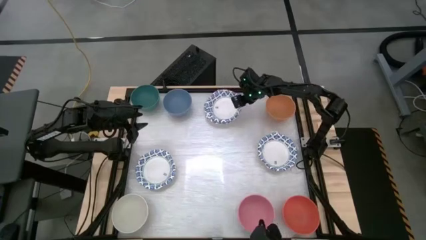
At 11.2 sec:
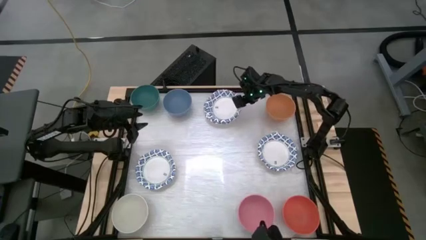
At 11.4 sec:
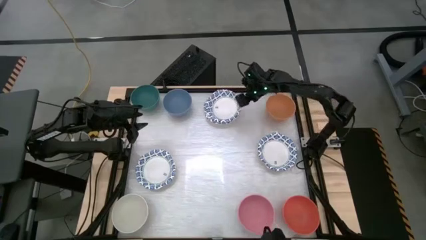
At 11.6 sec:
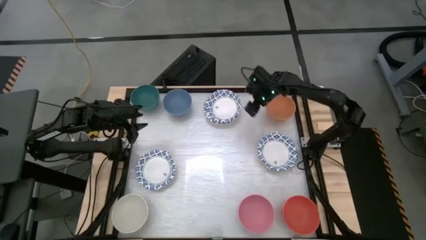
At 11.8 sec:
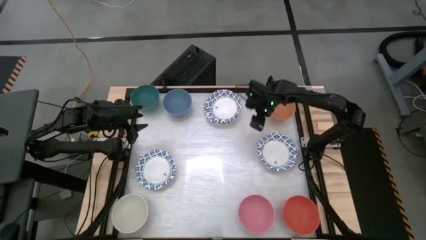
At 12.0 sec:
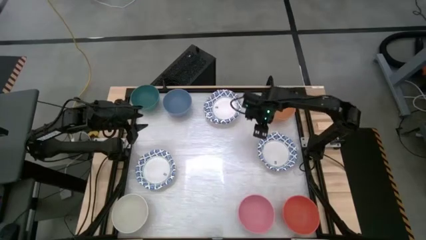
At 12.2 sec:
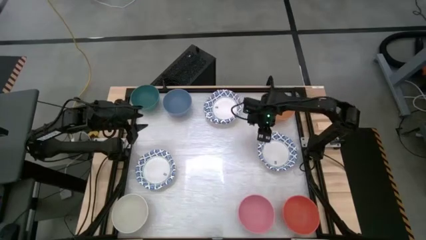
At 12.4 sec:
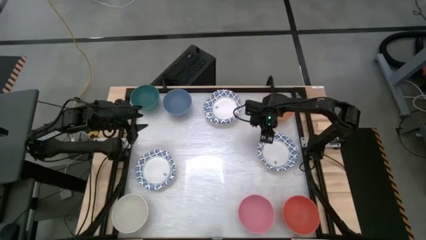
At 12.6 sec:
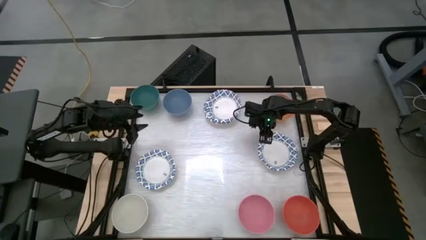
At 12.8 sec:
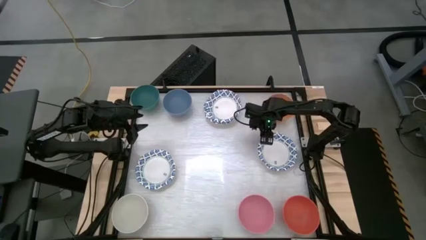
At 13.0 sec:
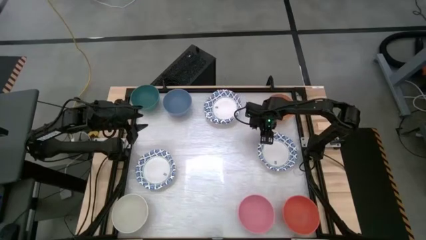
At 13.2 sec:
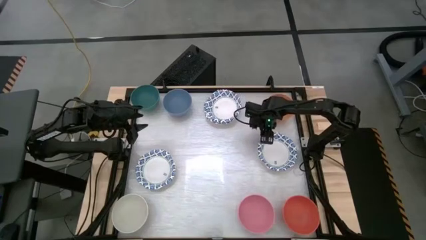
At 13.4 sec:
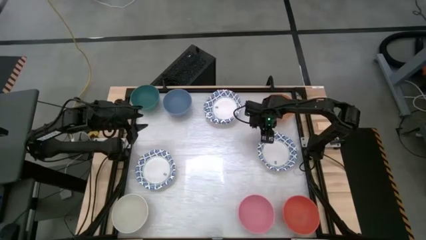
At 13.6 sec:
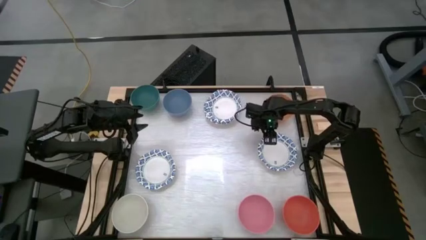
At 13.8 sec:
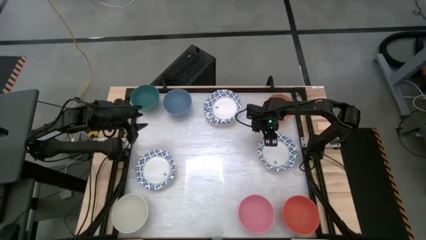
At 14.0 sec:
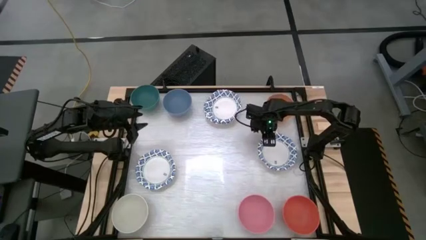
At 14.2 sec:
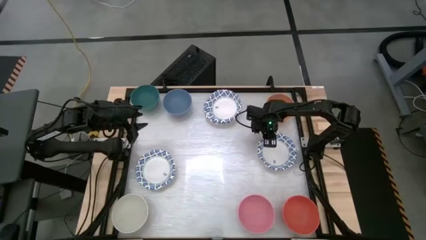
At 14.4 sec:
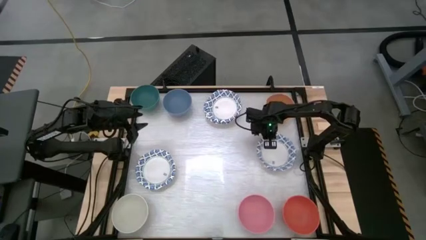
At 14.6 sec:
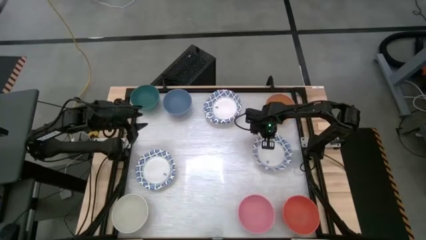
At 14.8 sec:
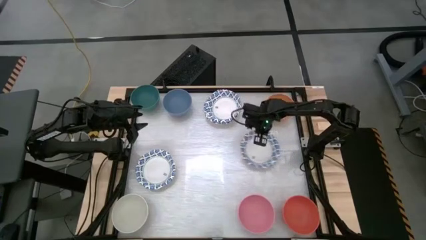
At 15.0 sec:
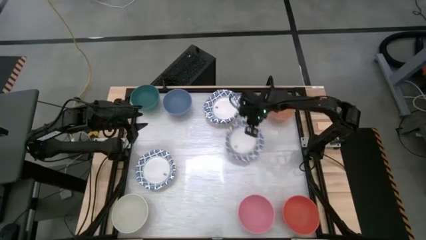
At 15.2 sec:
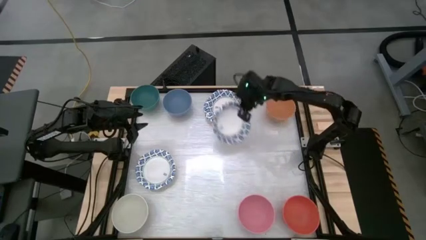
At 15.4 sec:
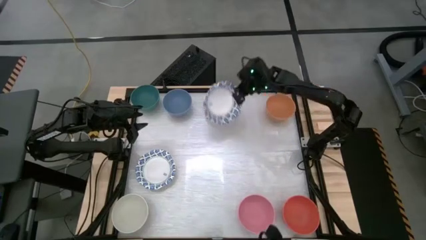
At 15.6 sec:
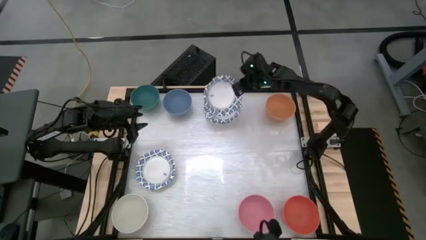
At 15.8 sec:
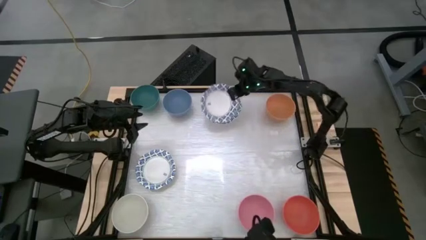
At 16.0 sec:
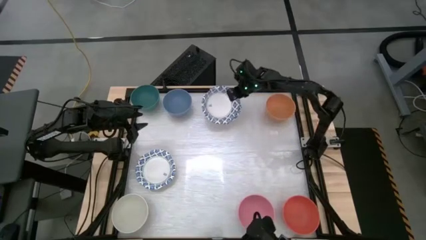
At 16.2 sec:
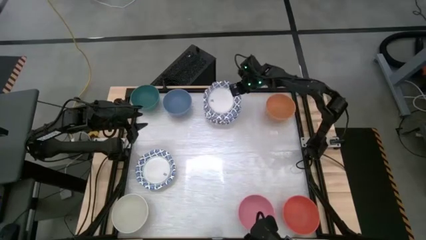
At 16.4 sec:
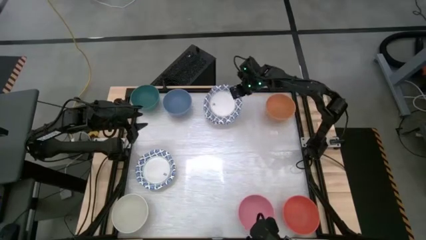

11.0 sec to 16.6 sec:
Stack the left blue pattern bowl on top of the blue pattern bowl

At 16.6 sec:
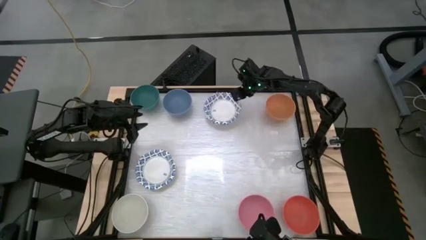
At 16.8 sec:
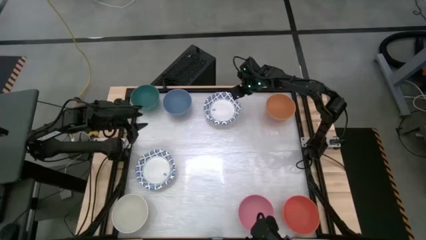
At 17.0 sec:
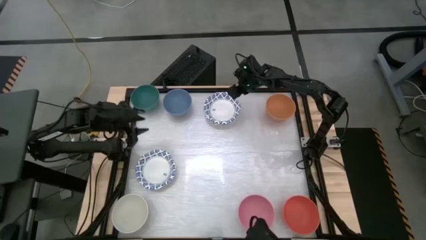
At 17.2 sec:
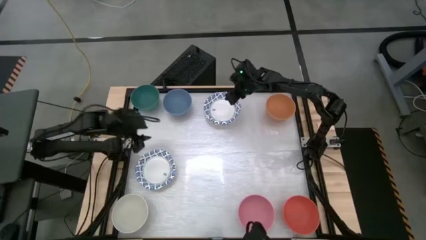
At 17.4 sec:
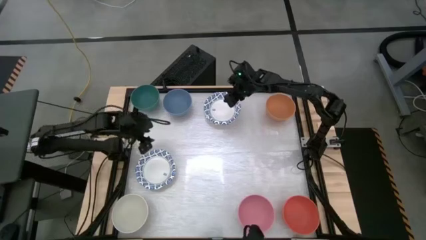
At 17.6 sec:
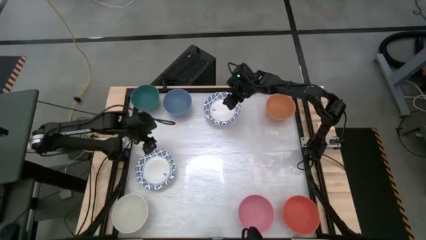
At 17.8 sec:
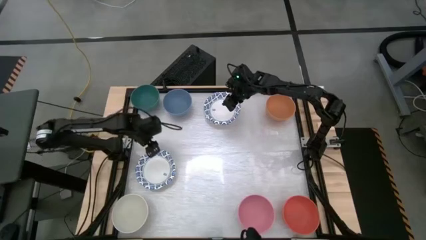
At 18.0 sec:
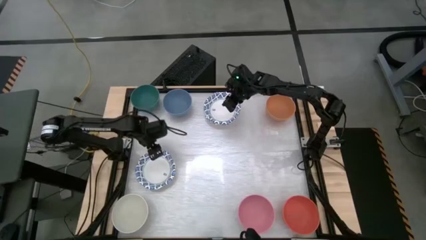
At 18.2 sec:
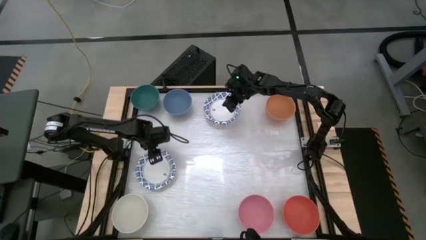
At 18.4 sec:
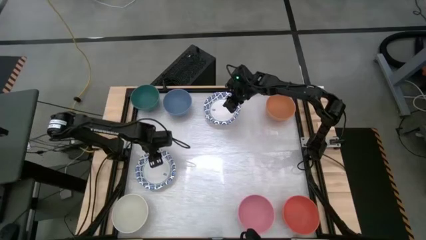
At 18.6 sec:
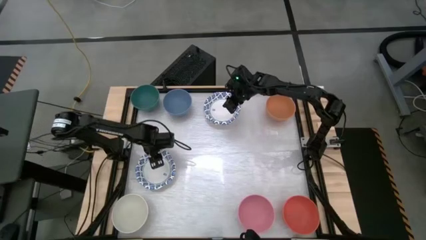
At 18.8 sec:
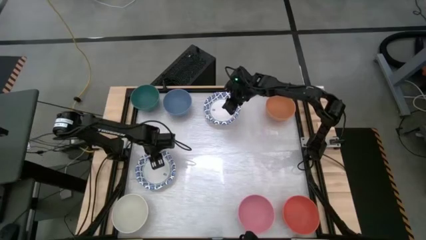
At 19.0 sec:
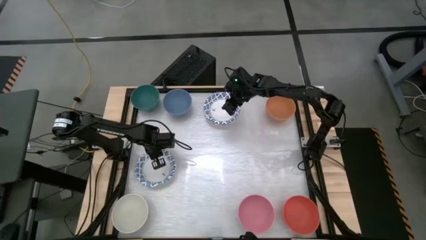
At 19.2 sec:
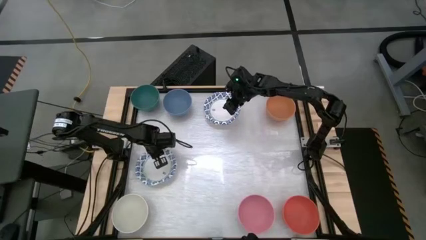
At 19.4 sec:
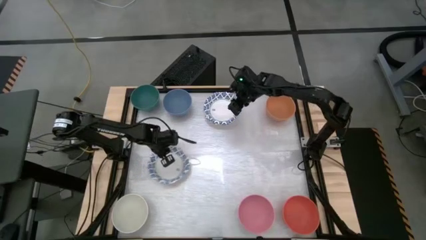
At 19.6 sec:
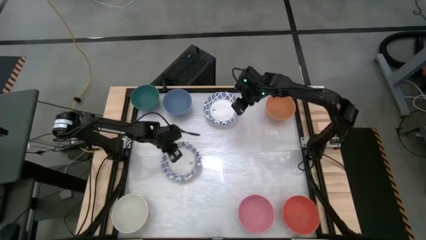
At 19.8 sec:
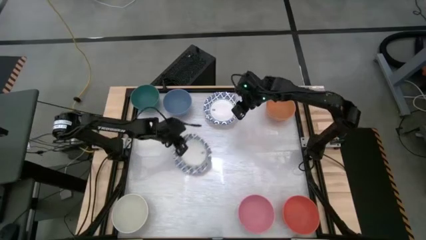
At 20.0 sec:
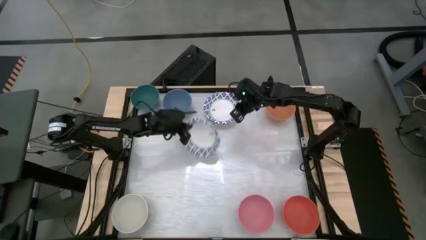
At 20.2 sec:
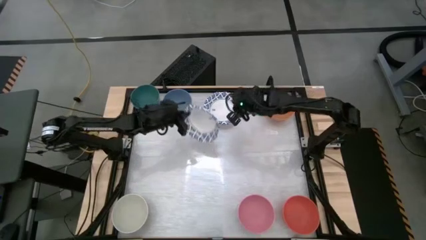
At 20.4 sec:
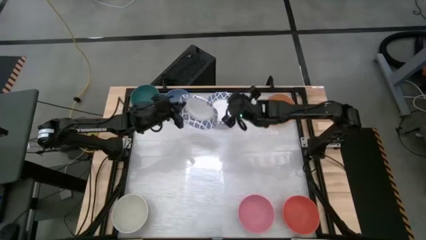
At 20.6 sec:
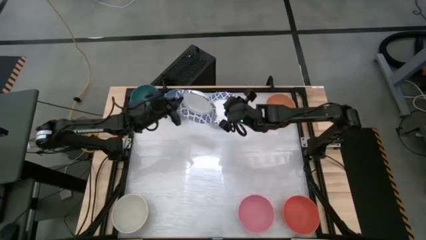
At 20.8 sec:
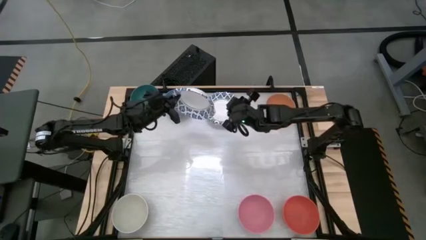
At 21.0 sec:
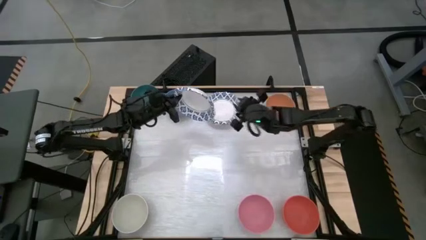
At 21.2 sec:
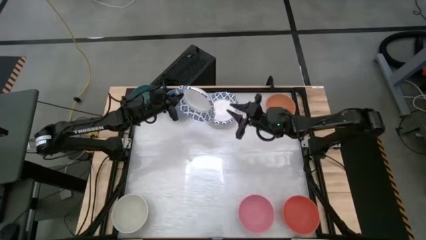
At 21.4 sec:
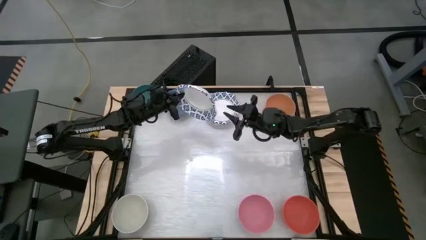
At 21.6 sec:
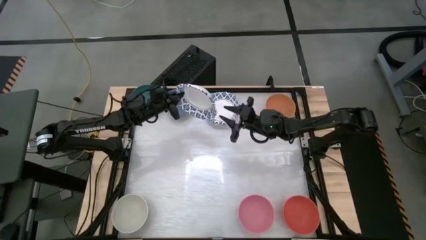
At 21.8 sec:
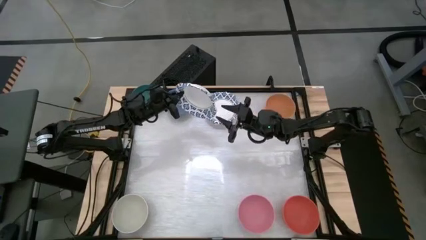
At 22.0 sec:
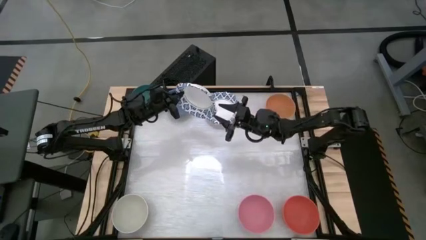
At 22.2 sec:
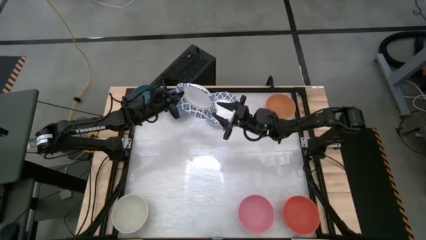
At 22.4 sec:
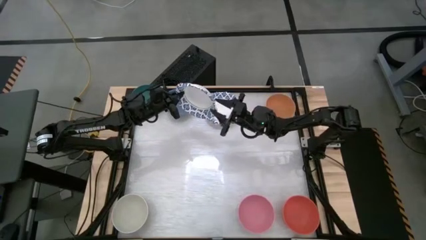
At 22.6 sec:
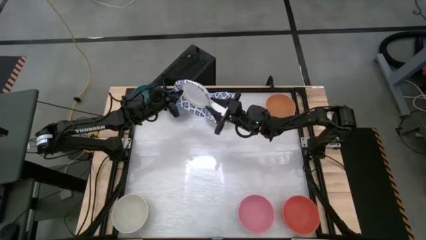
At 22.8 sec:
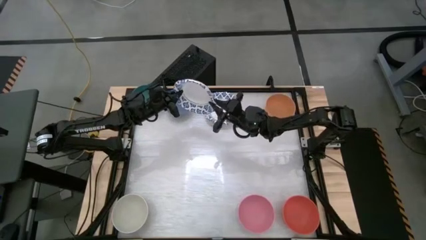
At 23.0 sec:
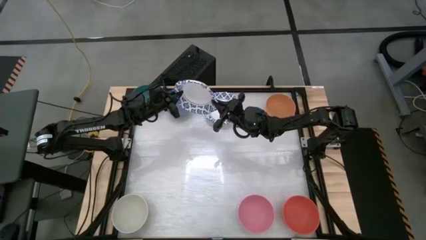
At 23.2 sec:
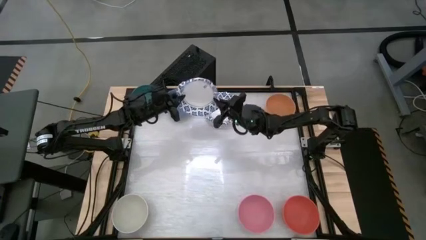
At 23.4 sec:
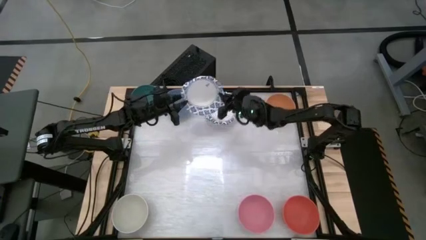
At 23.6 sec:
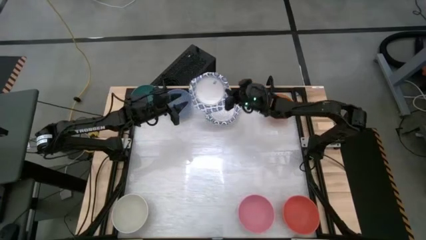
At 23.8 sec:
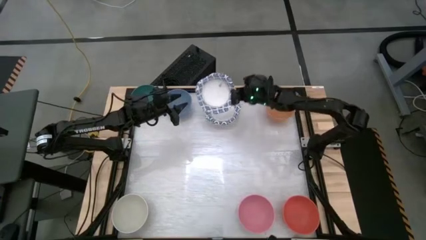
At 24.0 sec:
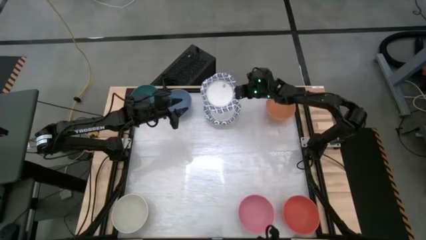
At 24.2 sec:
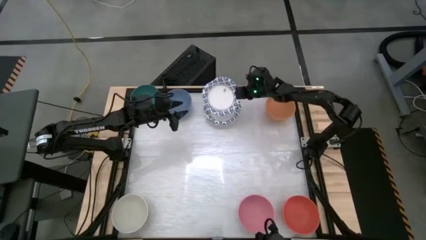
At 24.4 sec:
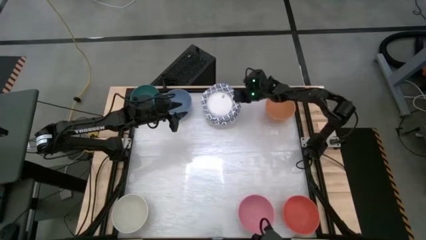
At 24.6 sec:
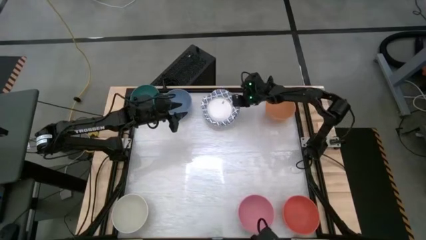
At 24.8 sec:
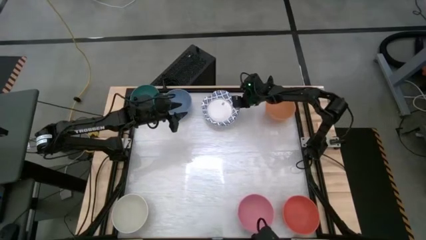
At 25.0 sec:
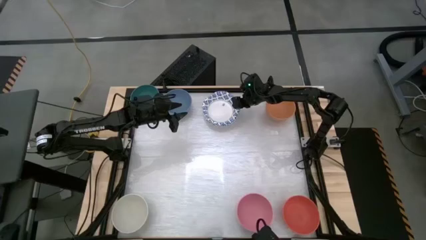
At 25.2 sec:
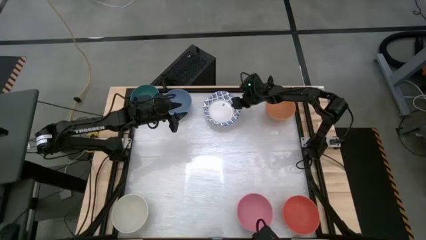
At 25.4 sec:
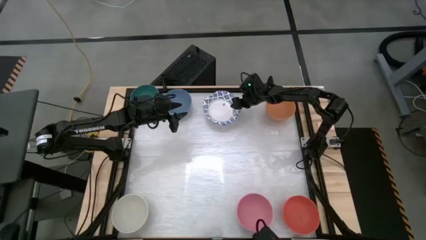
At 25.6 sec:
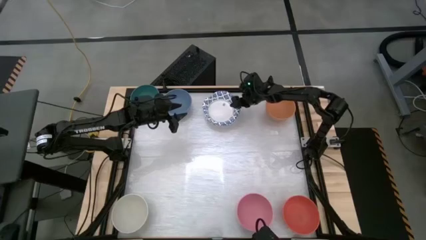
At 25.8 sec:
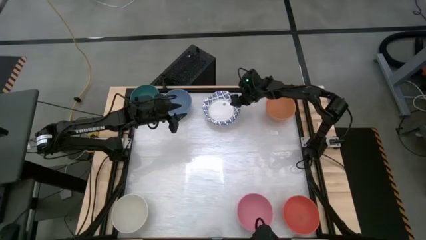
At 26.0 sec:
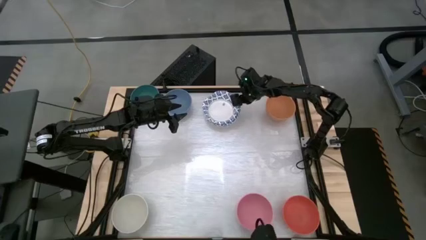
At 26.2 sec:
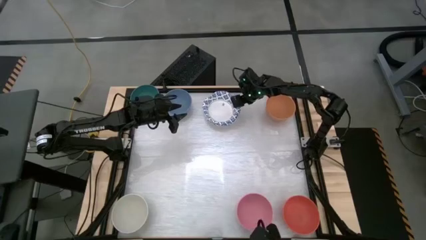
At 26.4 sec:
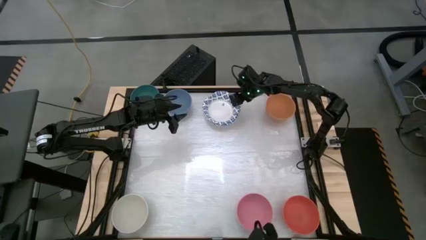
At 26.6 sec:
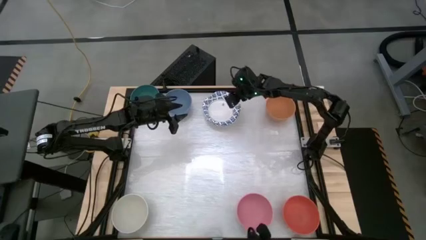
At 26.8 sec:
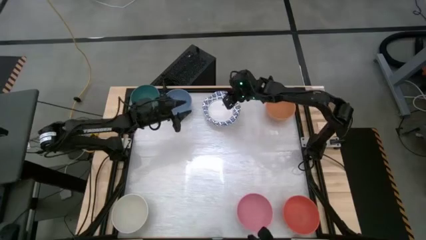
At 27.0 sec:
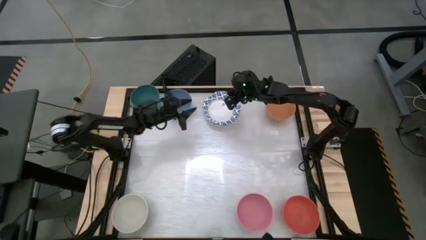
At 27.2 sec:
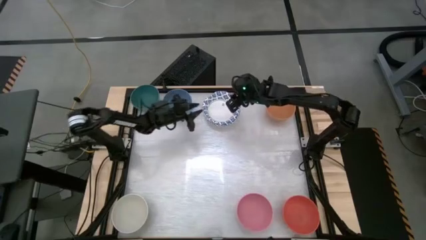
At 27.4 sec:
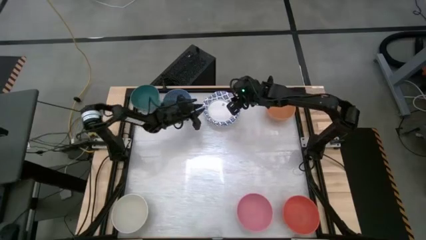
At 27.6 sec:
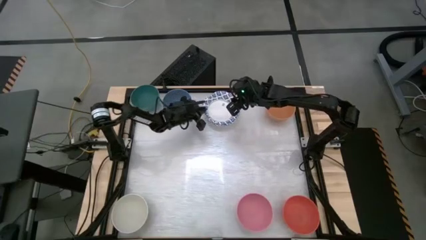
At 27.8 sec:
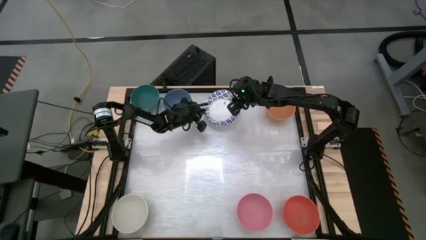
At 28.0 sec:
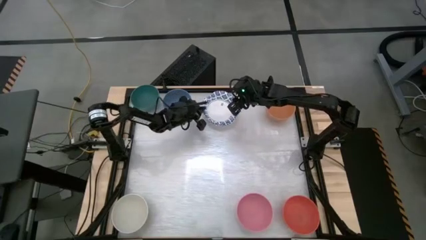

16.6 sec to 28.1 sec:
Stack the blue pattern bowl on top of the blue pattern bowl
